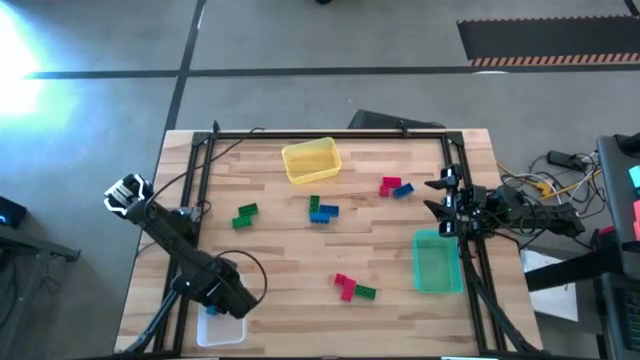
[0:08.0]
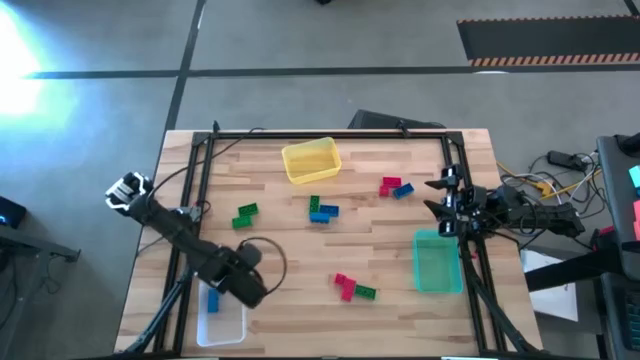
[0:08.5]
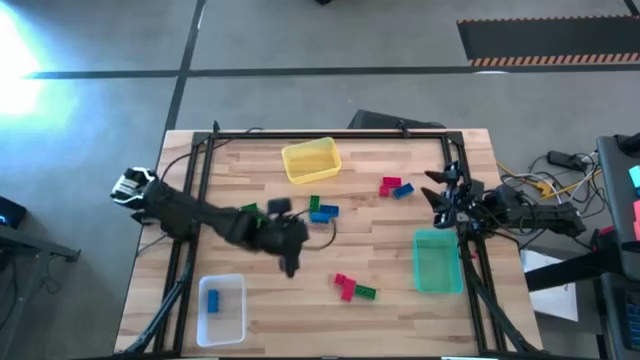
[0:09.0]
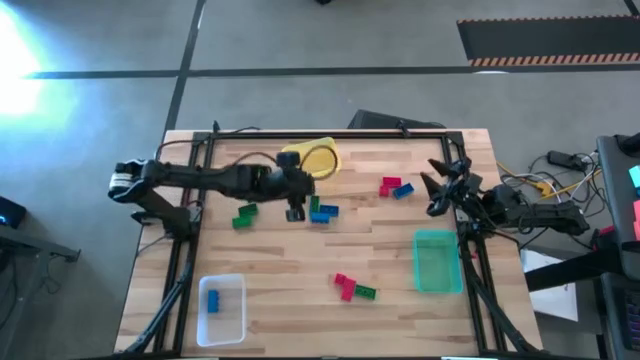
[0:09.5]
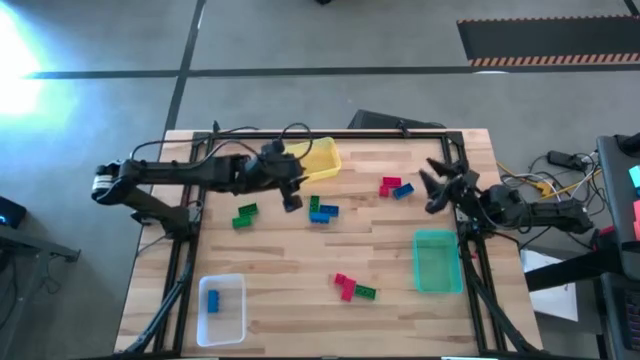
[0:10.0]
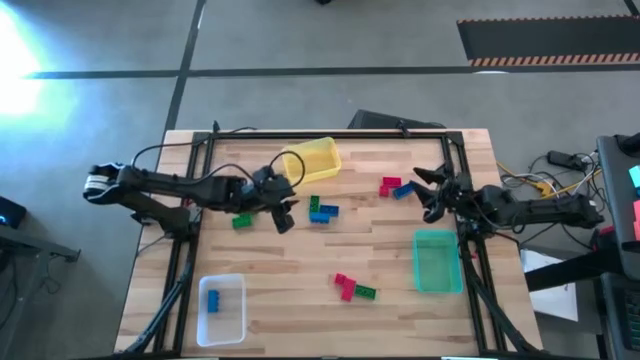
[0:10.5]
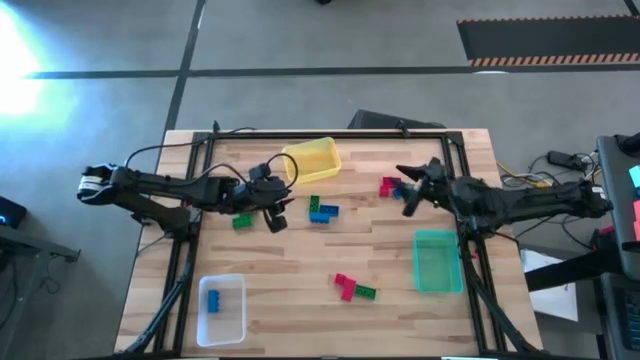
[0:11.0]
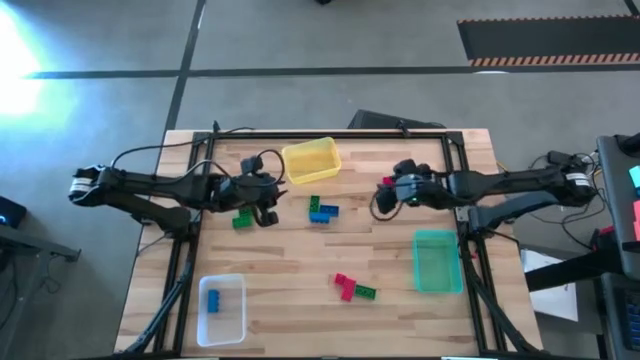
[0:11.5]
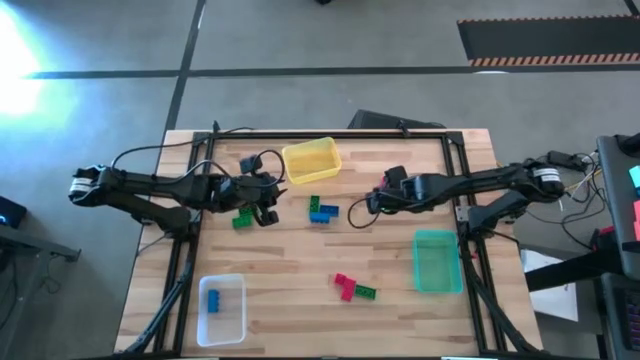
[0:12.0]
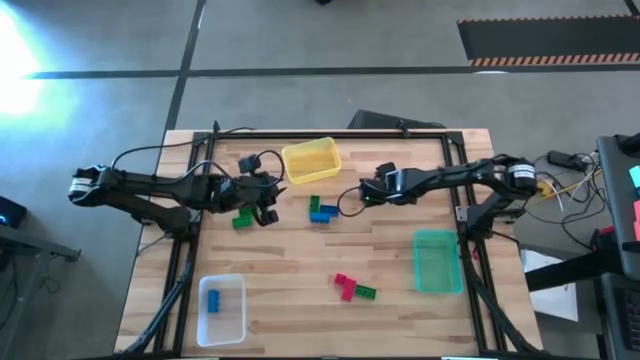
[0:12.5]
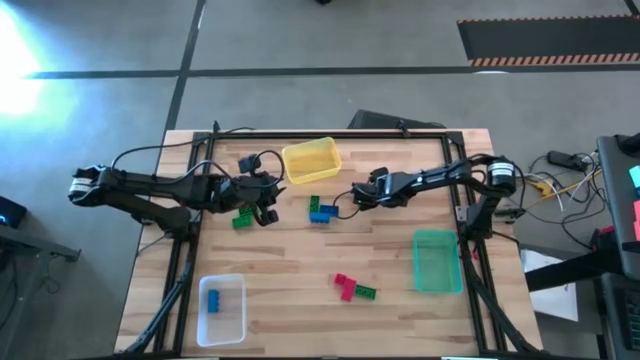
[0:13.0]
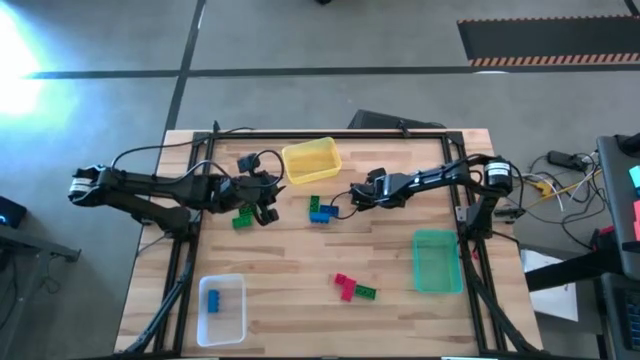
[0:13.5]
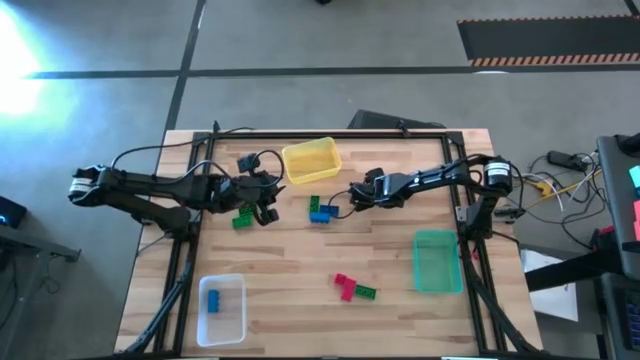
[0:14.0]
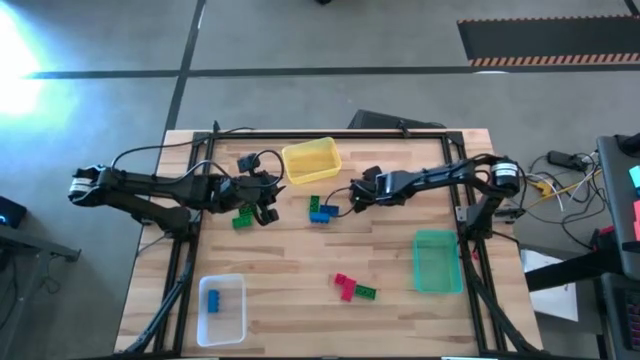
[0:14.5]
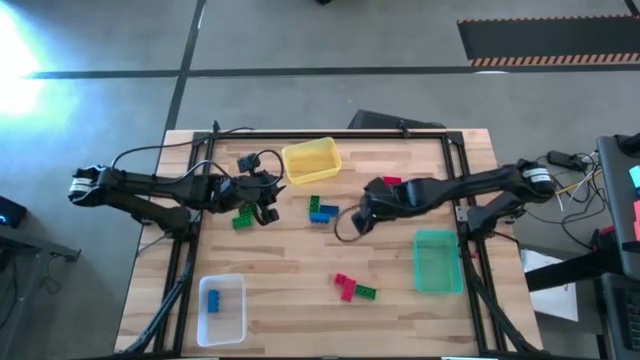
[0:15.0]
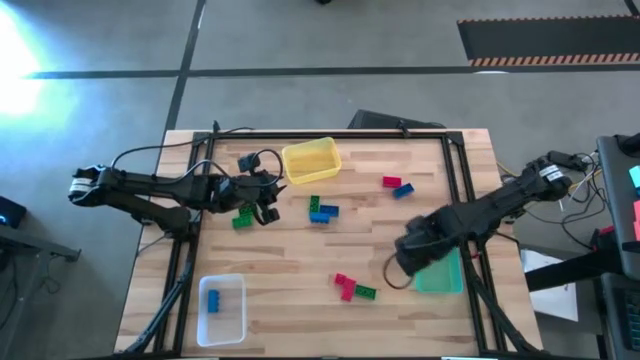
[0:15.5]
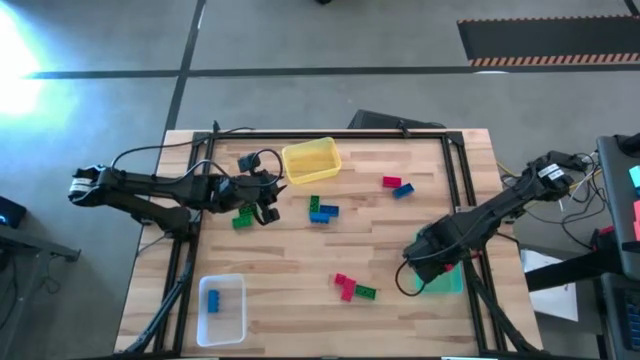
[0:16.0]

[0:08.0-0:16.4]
Task: Sort & place blocks by color
Put the red game piece into the green bin

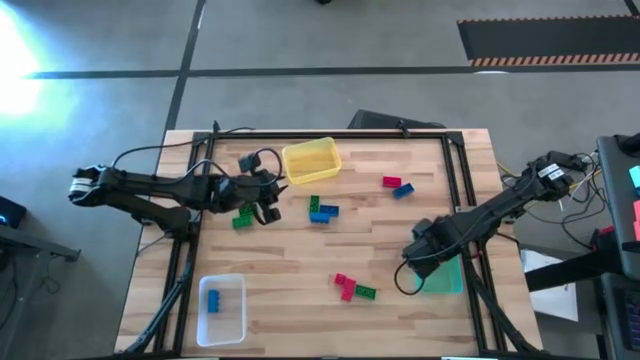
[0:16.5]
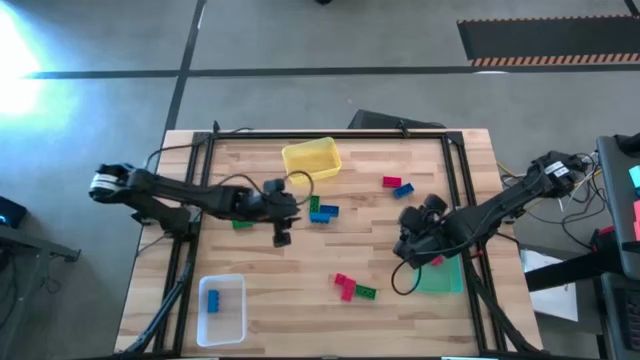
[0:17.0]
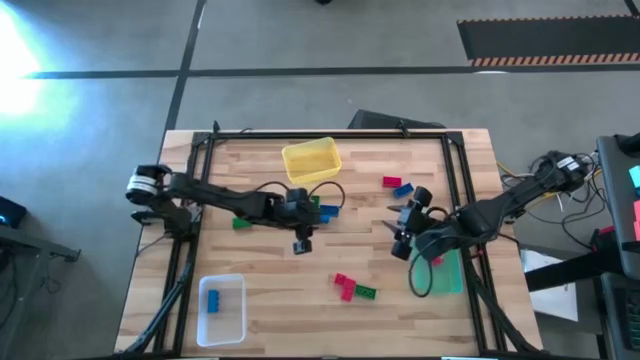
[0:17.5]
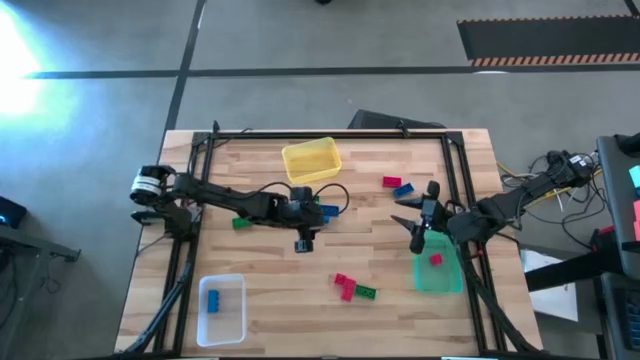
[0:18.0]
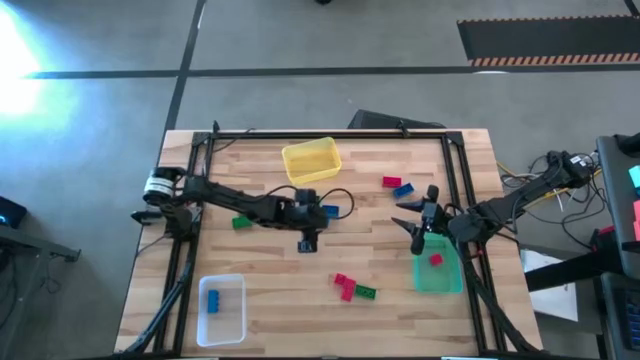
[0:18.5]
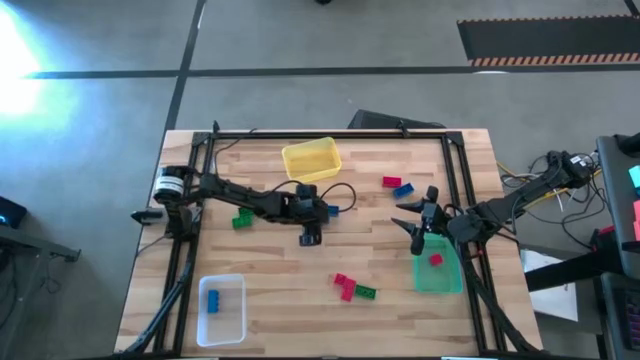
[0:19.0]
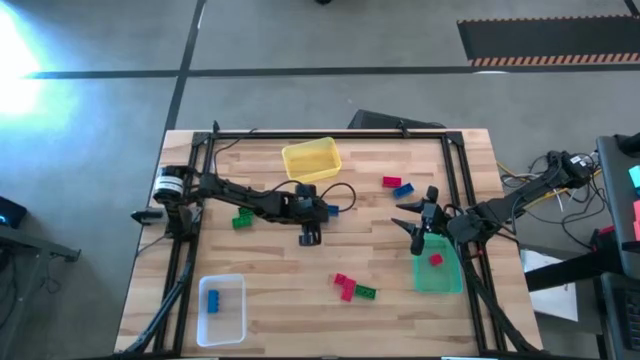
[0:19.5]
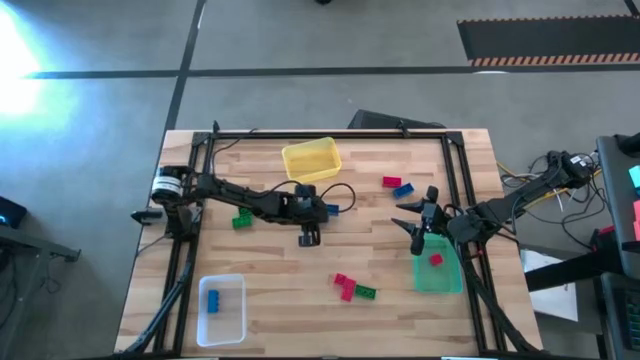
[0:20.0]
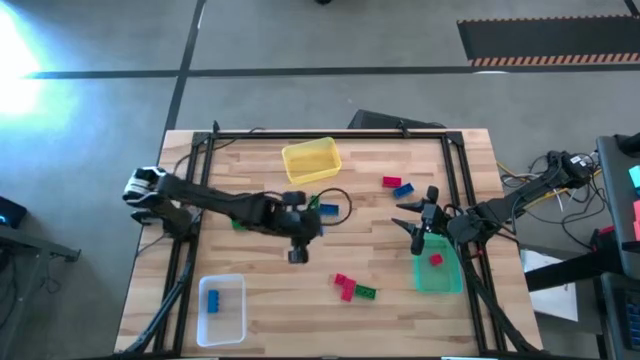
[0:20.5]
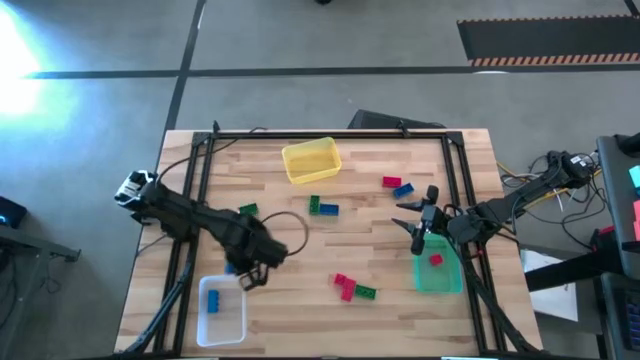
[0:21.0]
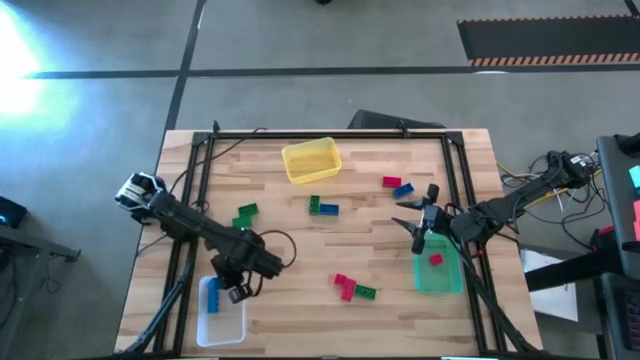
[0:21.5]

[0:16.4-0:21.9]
Put the blue game piece into the transparent bin

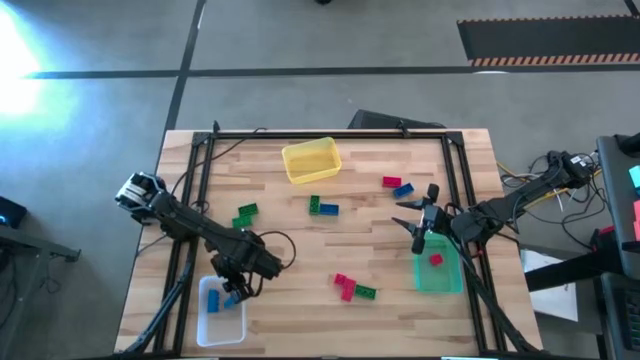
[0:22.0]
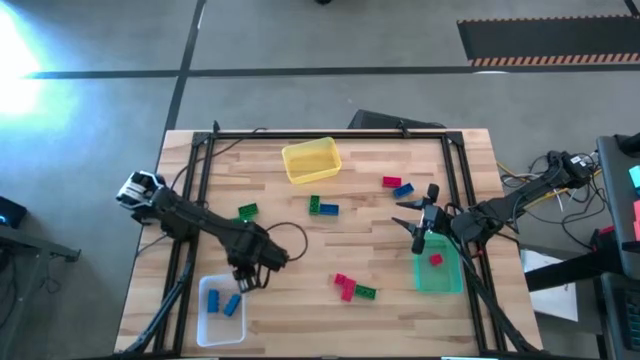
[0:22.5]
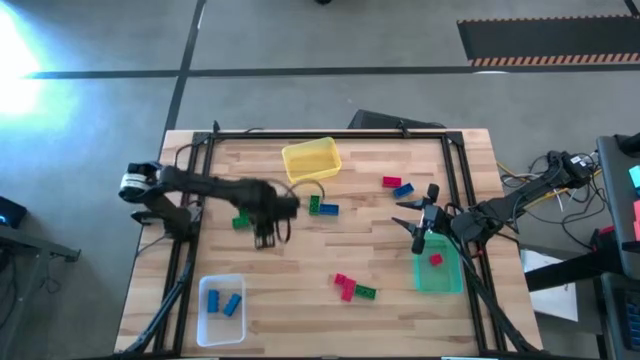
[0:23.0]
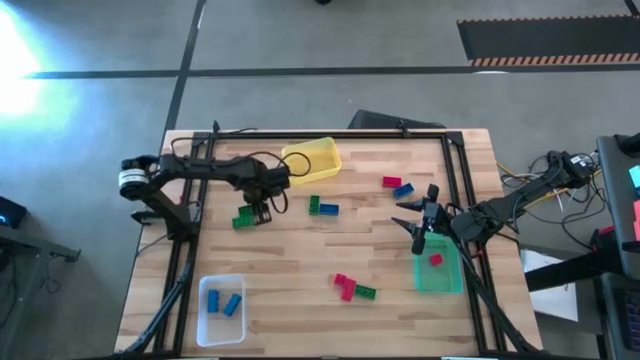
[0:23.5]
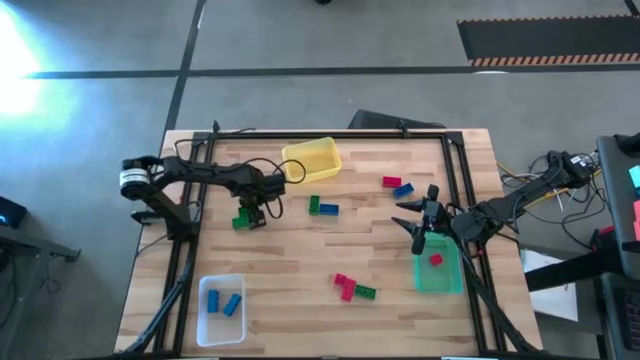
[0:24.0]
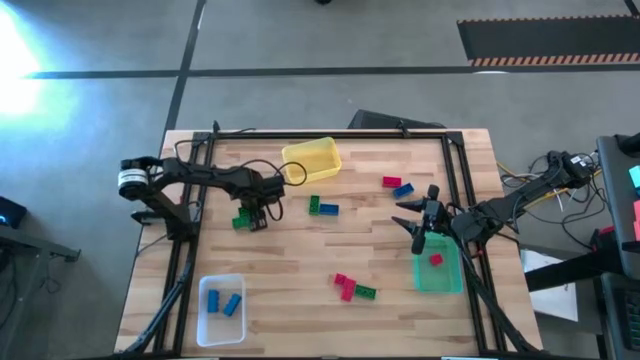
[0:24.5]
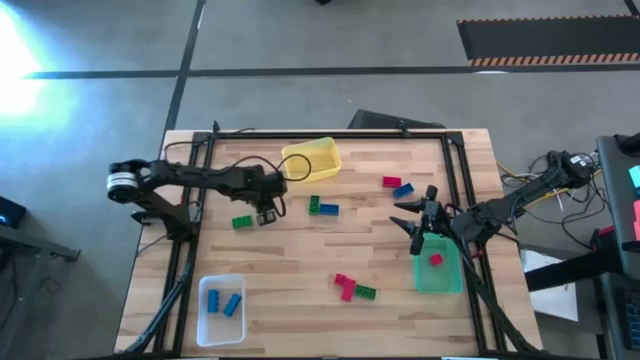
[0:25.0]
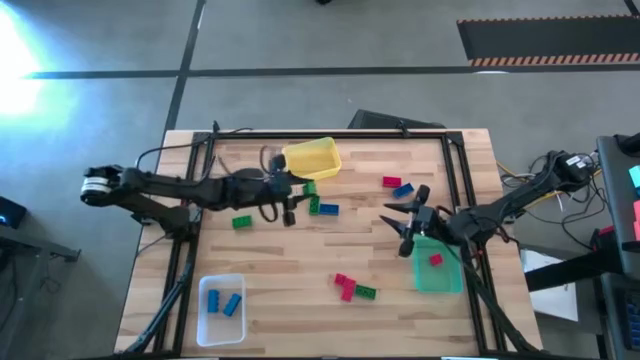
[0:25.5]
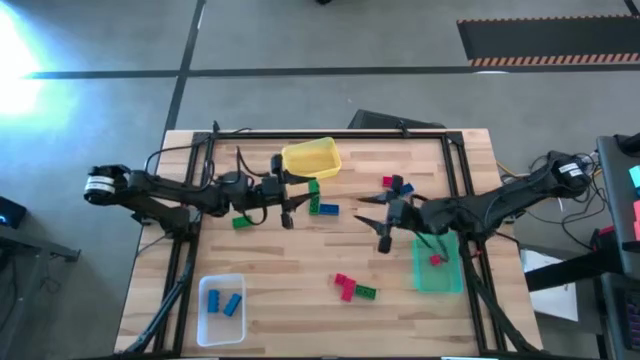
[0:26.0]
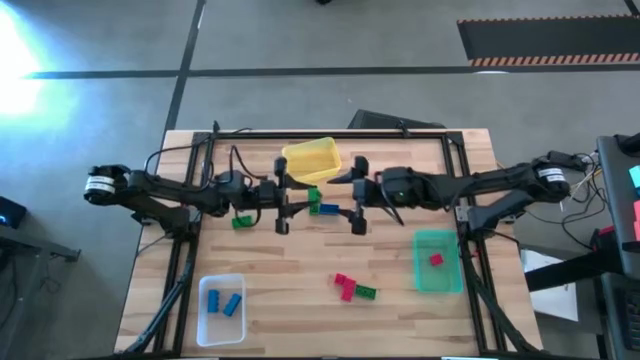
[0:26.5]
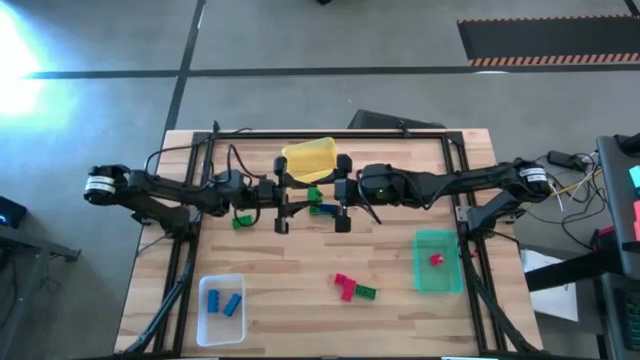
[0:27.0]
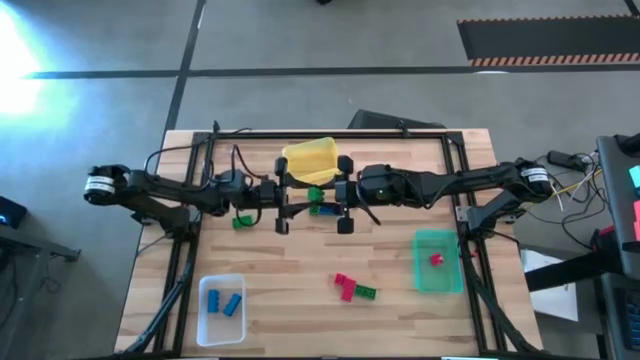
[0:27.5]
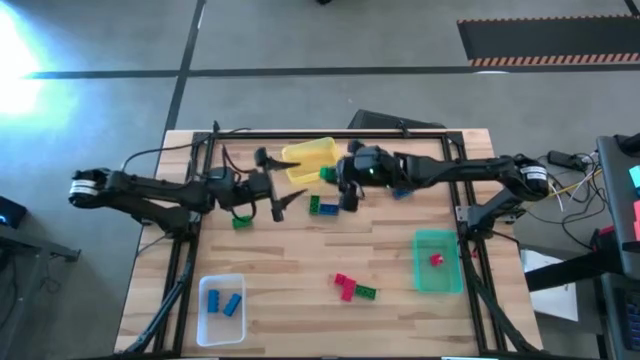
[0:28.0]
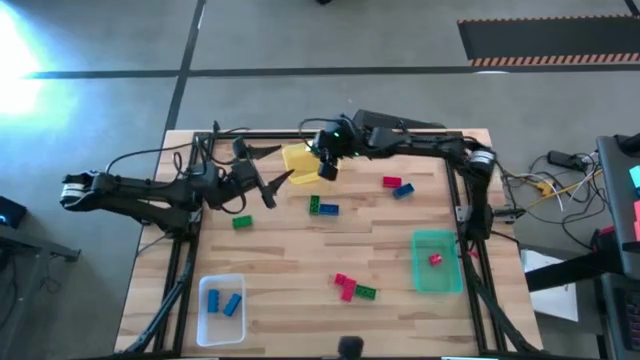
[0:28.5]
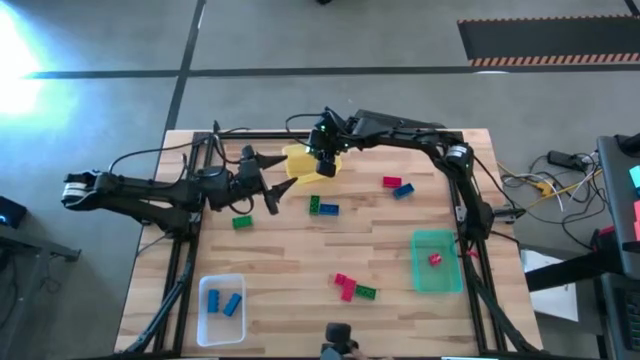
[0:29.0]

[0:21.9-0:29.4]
Put the green game piece into the yellow bin
